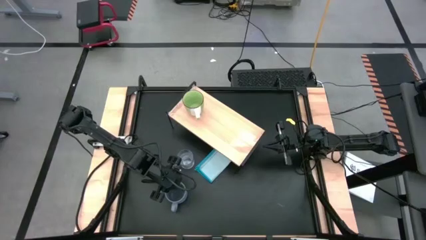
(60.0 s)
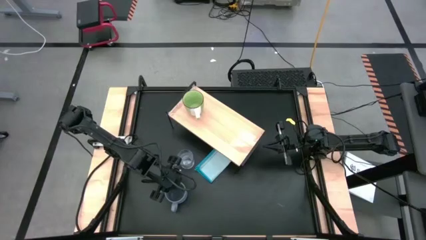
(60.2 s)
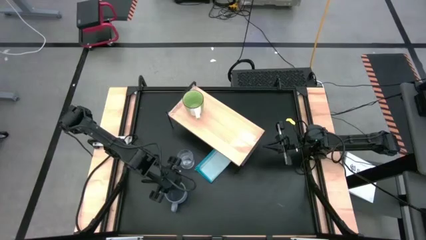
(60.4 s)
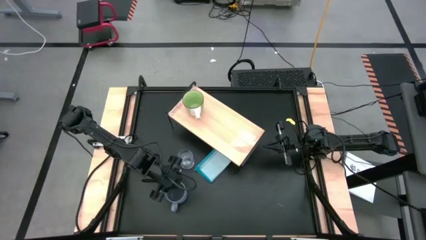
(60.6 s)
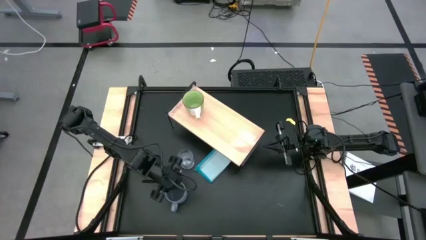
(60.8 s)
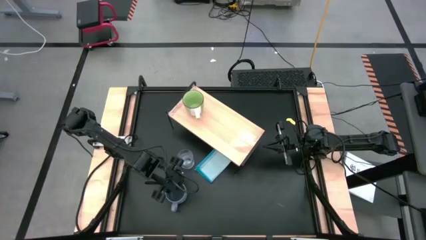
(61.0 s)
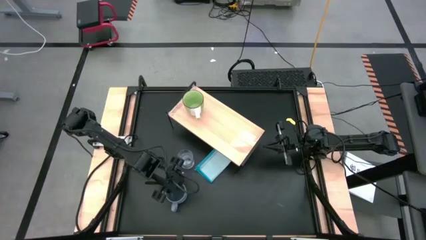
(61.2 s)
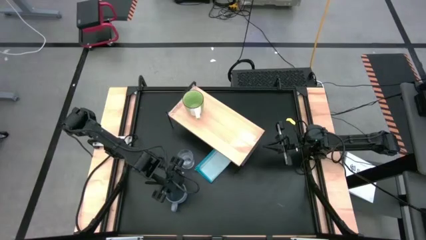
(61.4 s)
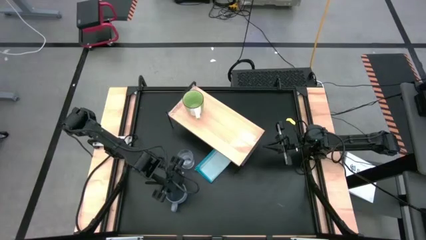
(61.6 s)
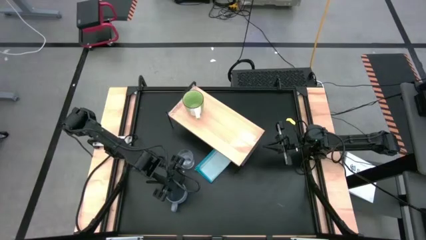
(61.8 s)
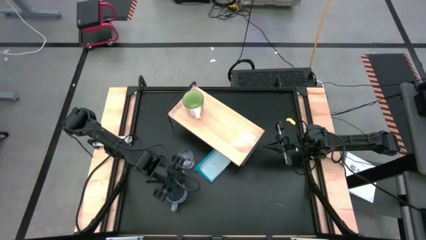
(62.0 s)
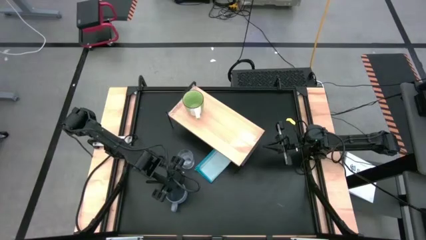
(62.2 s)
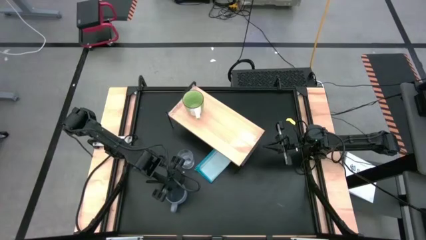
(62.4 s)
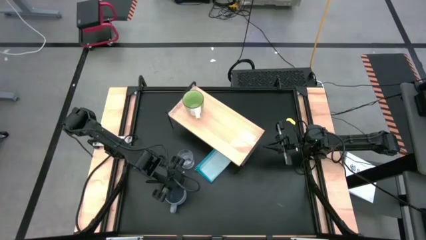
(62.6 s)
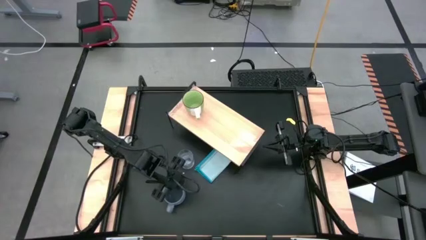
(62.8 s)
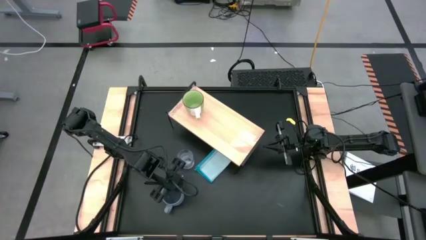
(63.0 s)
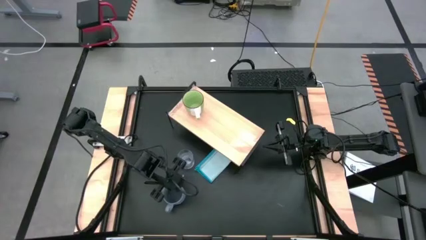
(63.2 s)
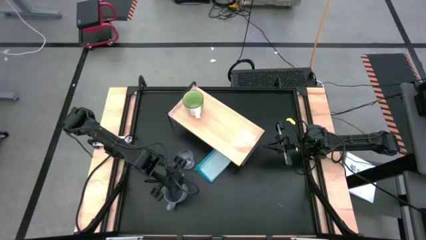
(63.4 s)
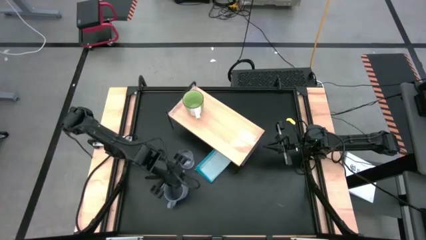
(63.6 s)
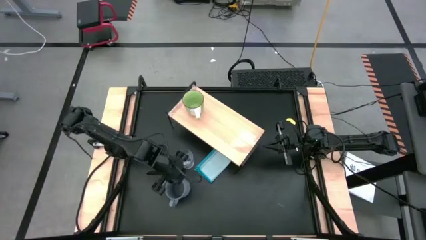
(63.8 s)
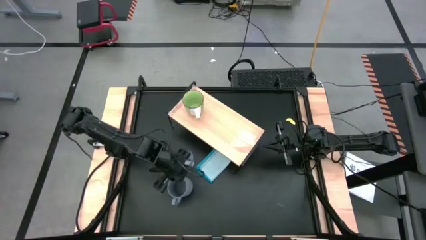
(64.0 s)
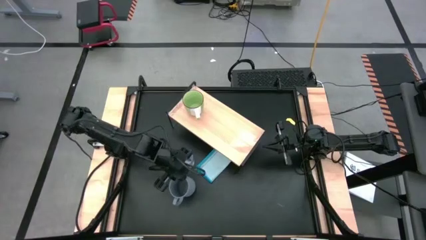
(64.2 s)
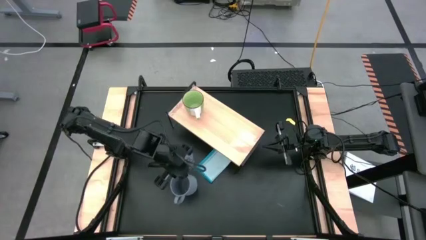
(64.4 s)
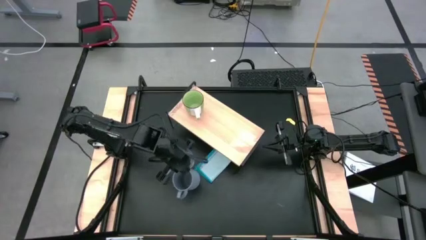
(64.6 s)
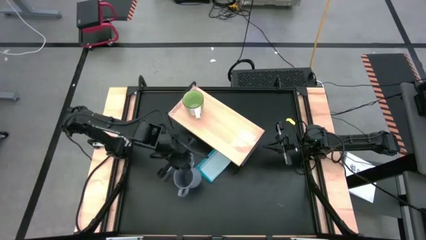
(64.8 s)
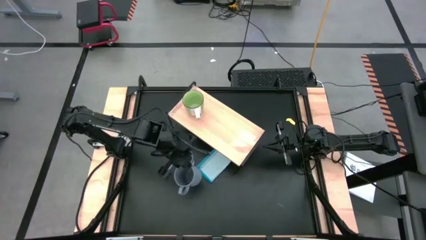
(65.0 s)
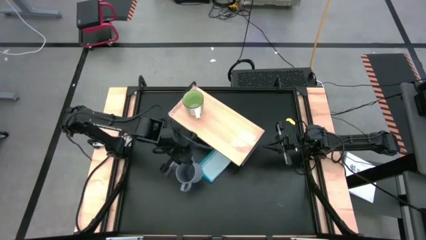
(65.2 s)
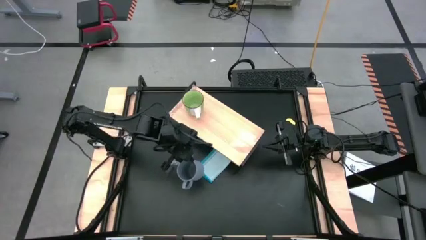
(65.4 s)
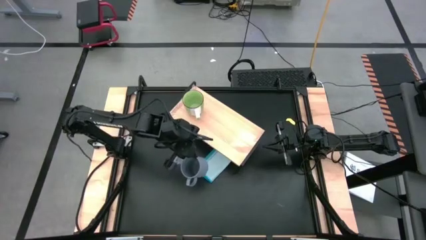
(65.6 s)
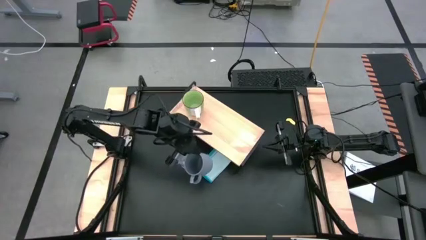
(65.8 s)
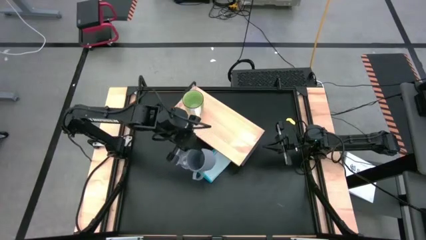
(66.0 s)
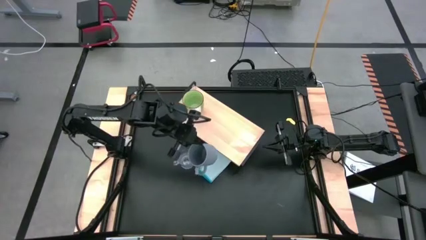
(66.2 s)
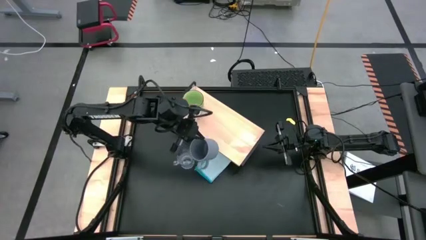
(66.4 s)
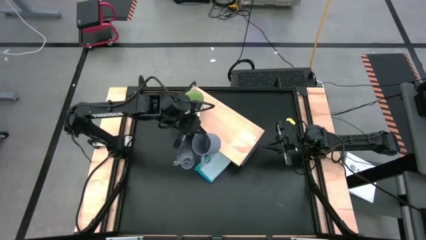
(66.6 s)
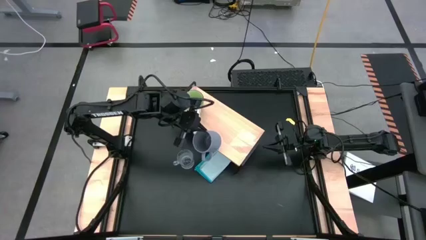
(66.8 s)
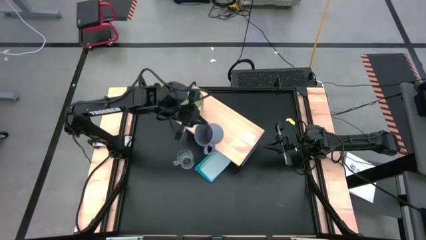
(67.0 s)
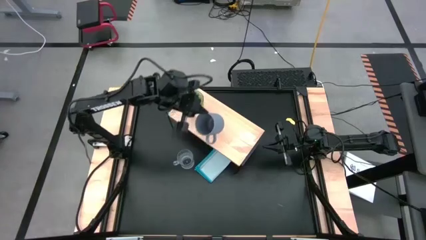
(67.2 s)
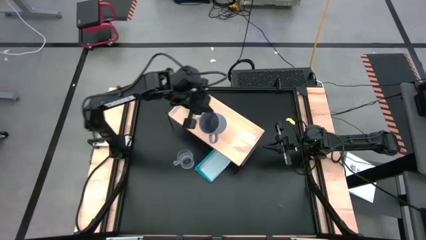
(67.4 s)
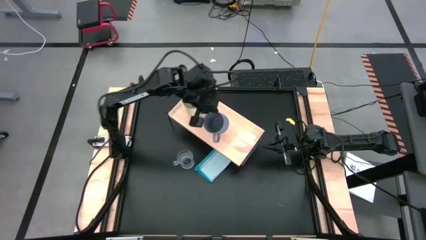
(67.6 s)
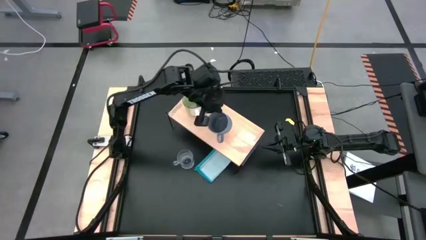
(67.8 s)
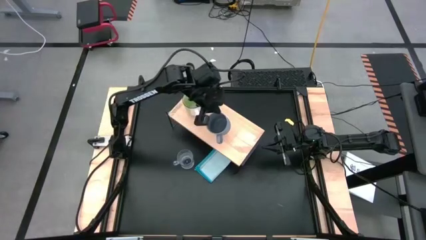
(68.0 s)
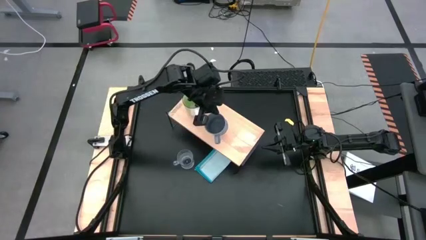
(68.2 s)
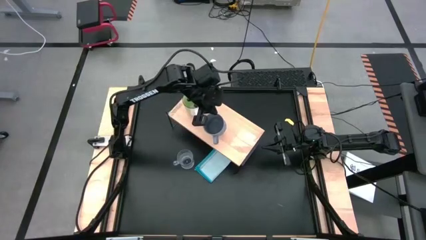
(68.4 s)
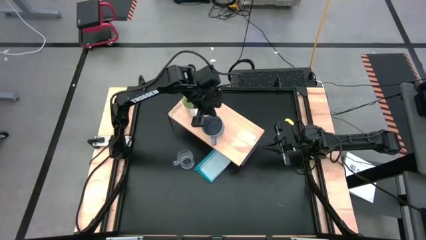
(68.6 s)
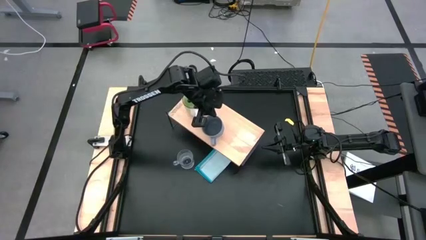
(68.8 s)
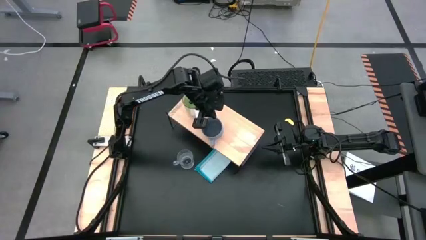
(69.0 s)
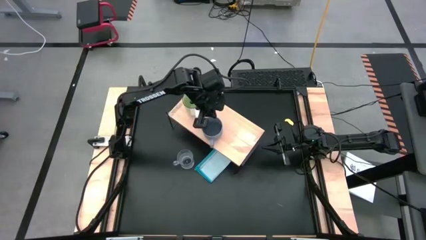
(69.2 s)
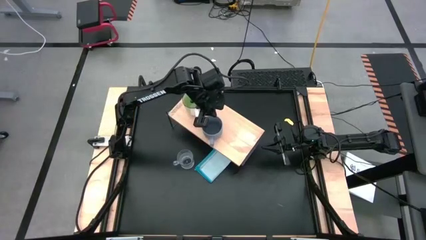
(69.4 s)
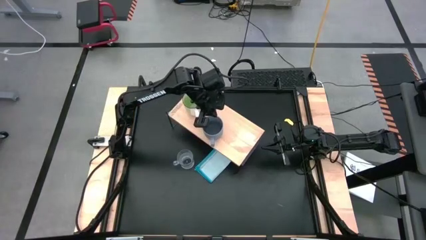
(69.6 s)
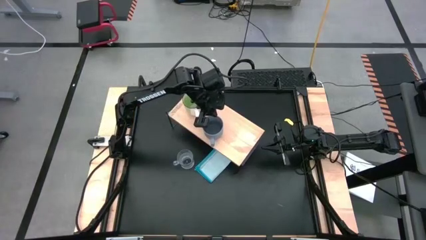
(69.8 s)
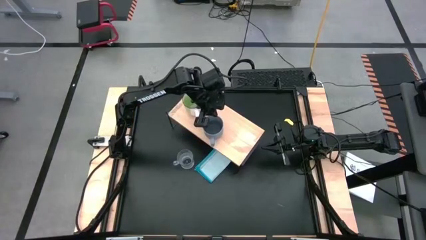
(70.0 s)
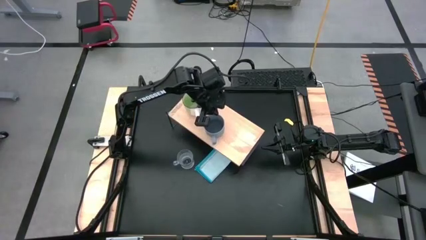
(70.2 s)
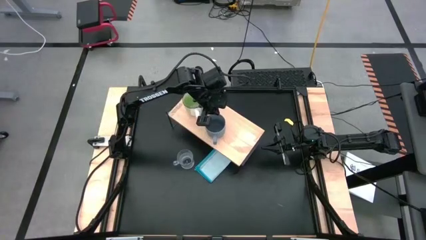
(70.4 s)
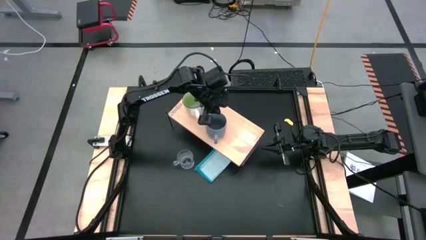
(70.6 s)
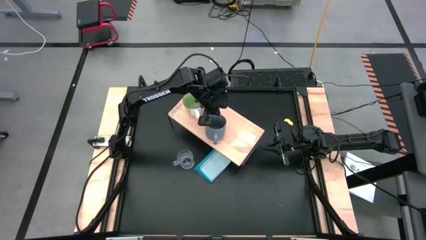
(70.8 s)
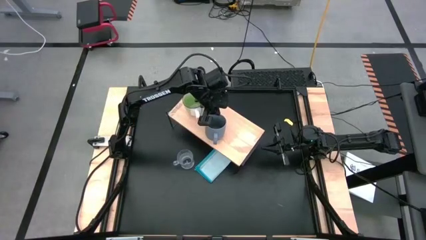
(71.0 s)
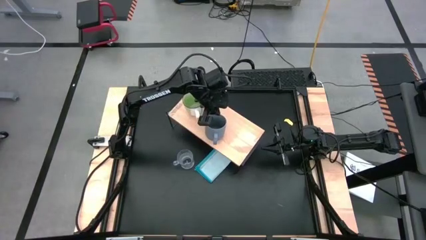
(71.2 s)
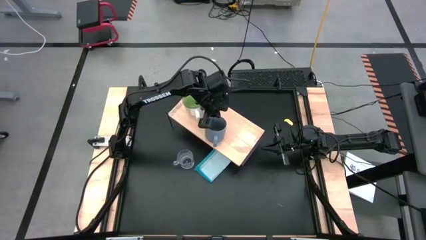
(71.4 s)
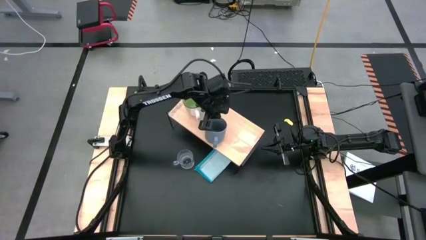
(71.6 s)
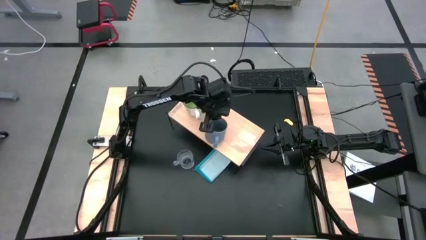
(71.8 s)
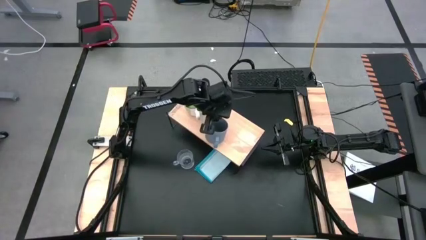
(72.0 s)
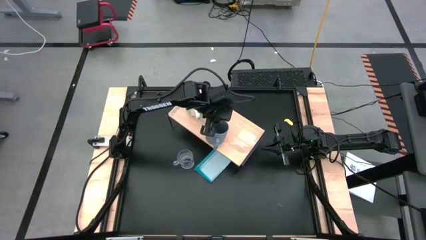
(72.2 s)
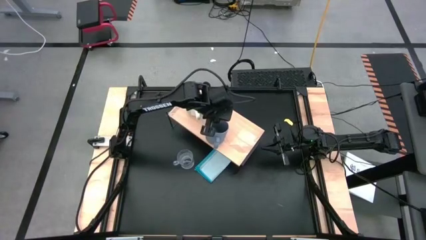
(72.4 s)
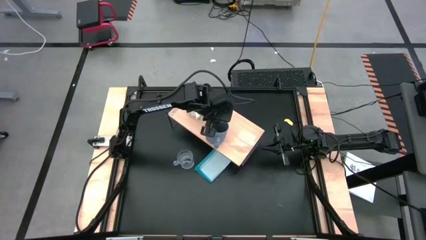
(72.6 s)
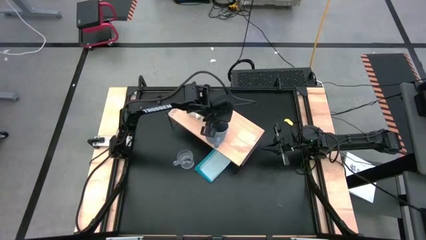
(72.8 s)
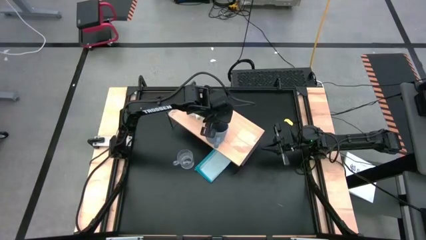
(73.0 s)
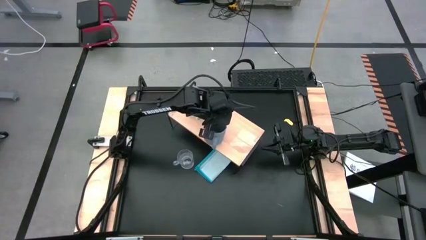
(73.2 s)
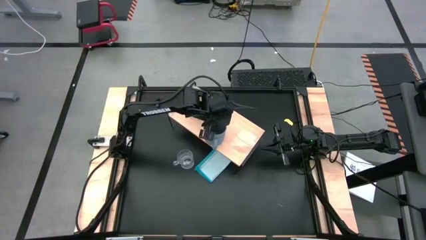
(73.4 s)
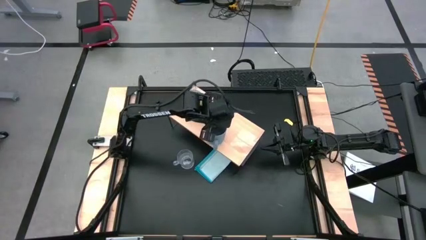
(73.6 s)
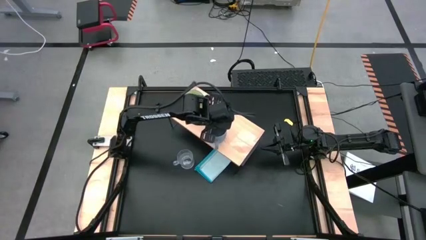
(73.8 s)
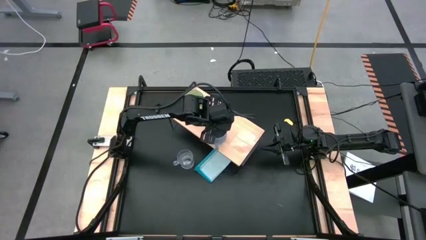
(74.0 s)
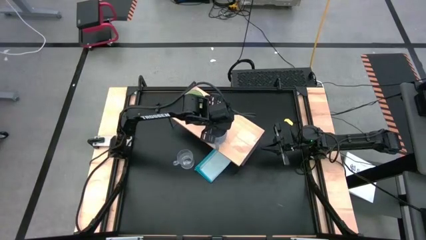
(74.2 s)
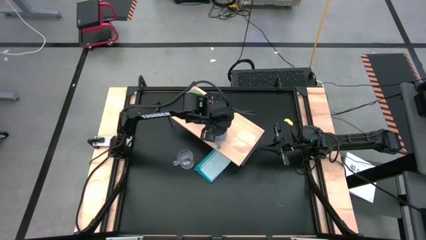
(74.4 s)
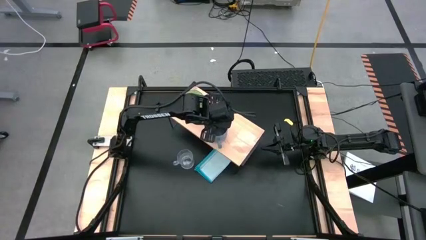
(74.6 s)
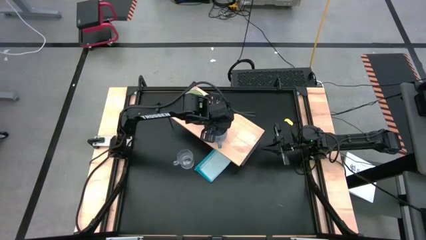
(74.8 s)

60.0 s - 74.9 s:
Task: Stack small to large cups/mugs on shelf
Put the blue mug on the shelf

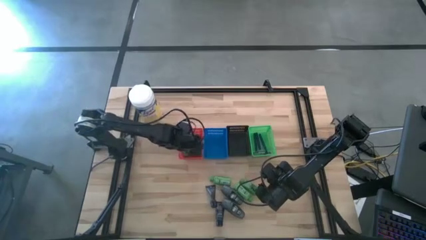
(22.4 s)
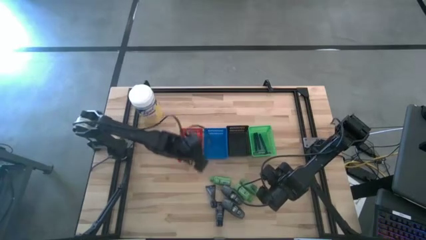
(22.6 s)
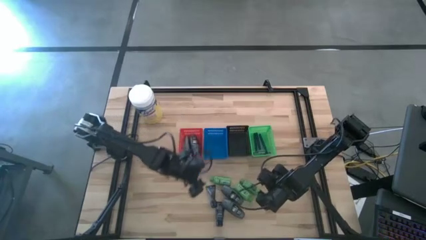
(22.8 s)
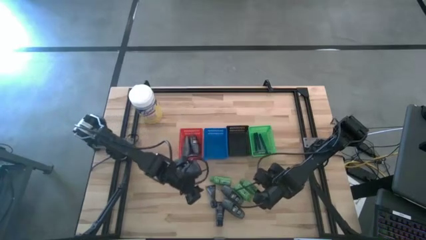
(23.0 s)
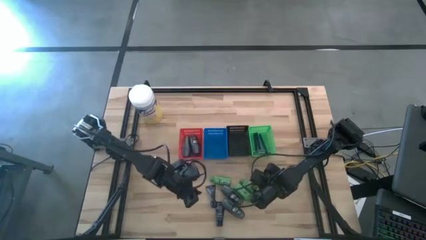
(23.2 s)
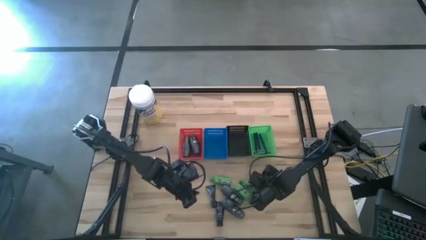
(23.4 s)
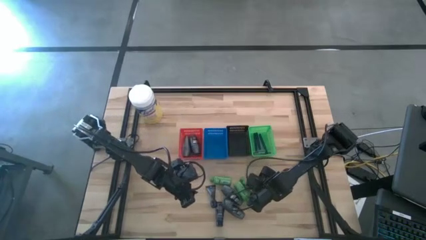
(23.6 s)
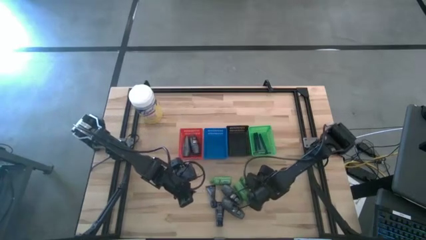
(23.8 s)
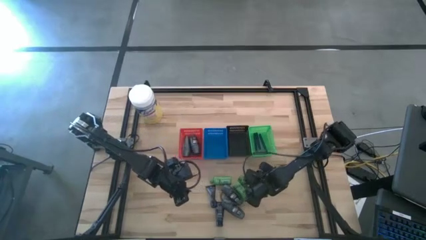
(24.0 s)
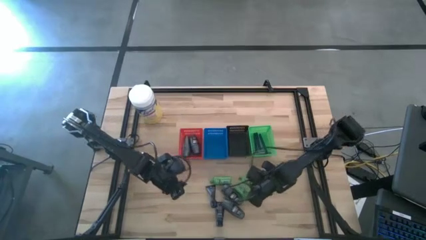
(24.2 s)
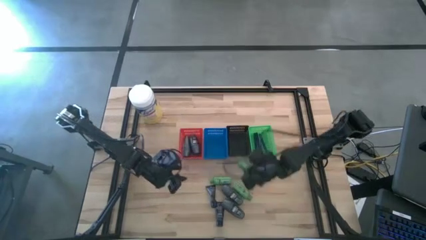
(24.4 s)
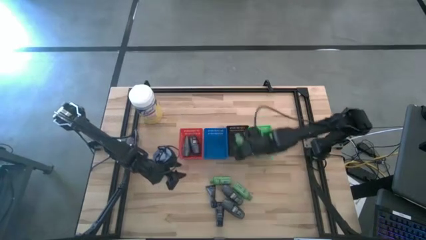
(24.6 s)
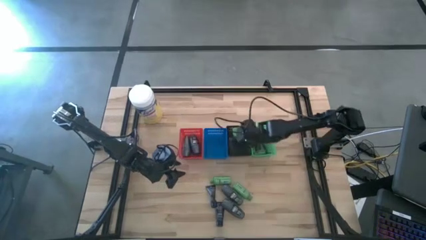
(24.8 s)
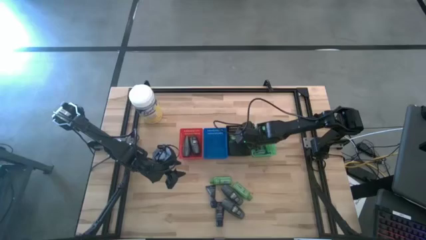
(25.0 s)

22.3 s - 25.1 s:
Task: Pick & Place Travel size toiletries
Put the green shampoo into the black bin
